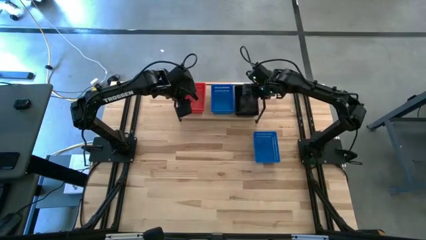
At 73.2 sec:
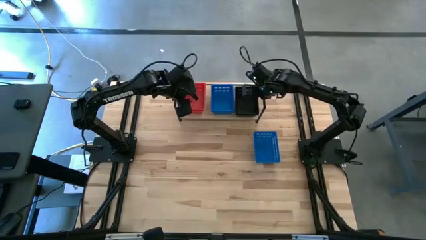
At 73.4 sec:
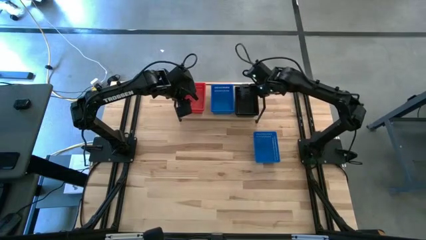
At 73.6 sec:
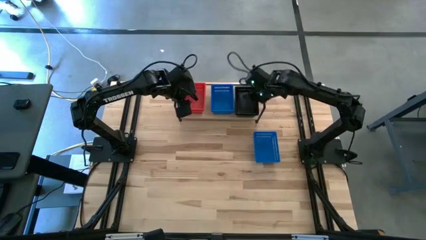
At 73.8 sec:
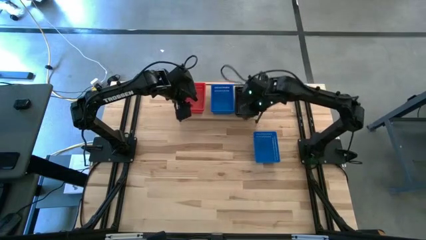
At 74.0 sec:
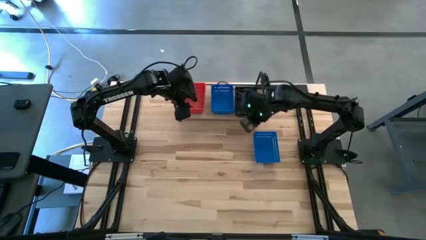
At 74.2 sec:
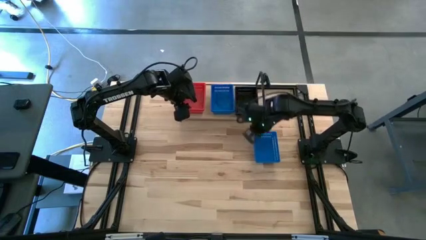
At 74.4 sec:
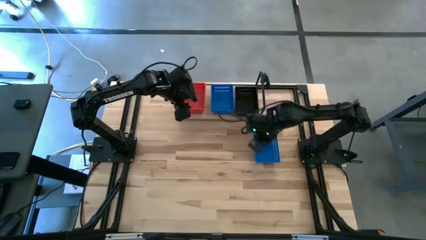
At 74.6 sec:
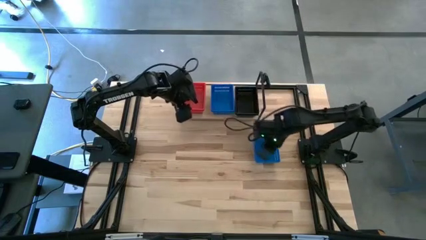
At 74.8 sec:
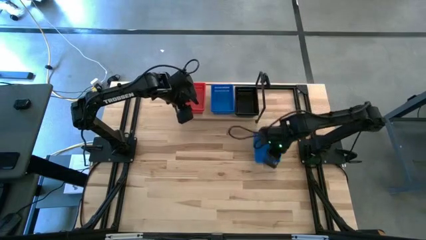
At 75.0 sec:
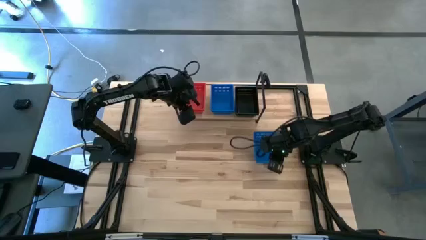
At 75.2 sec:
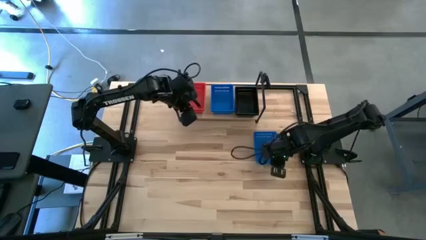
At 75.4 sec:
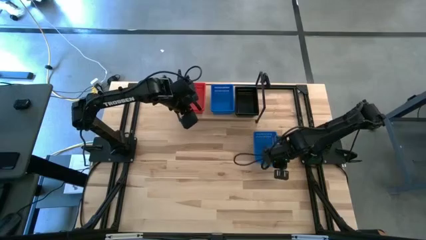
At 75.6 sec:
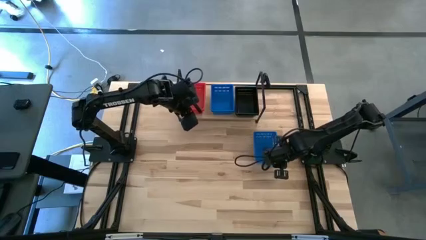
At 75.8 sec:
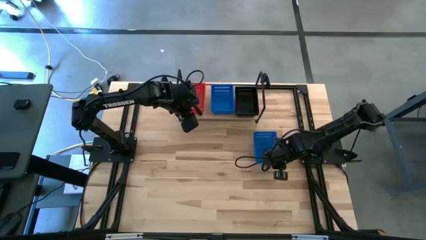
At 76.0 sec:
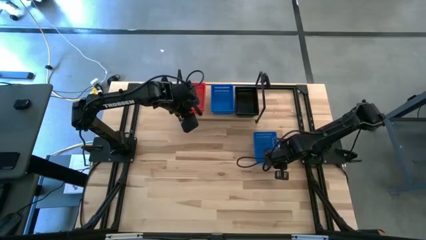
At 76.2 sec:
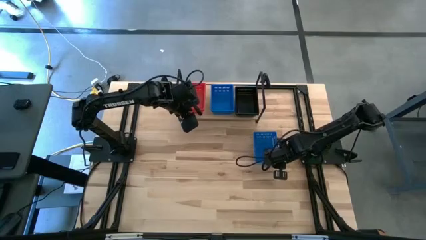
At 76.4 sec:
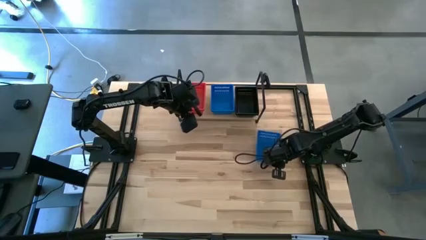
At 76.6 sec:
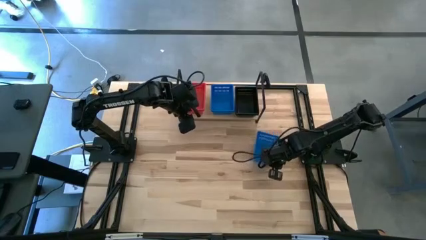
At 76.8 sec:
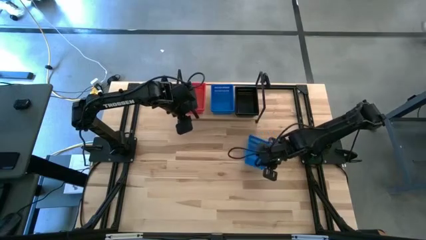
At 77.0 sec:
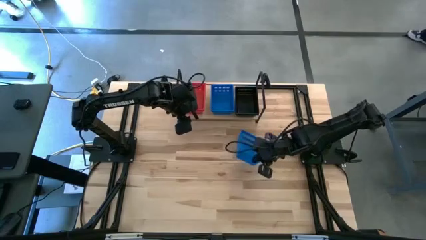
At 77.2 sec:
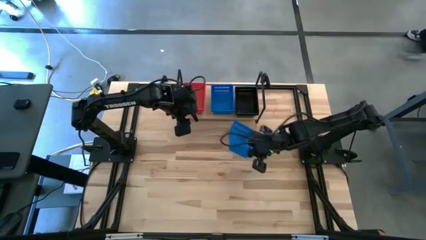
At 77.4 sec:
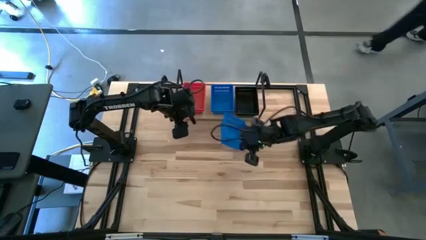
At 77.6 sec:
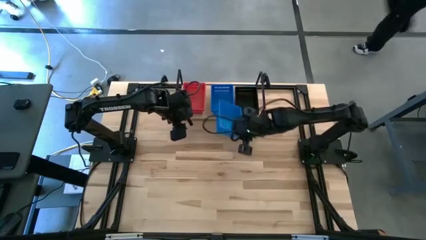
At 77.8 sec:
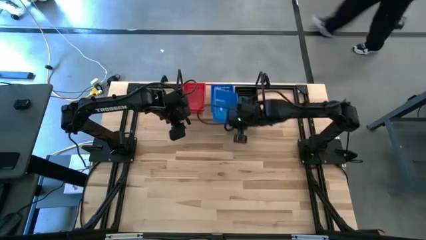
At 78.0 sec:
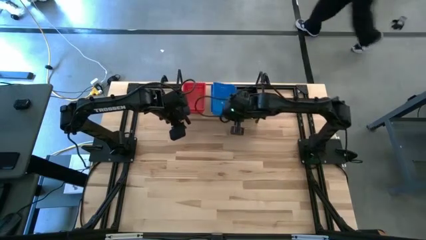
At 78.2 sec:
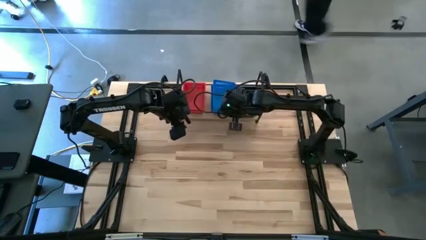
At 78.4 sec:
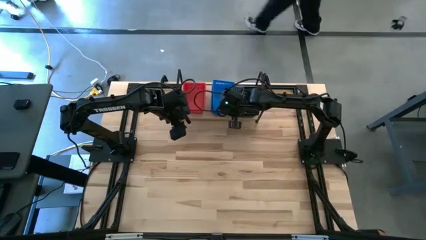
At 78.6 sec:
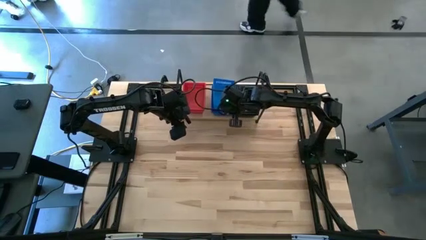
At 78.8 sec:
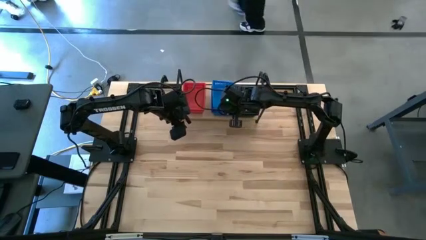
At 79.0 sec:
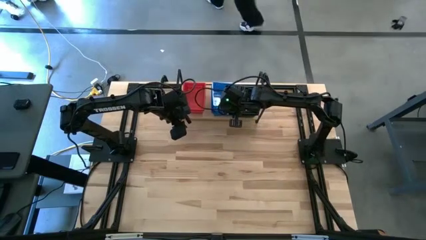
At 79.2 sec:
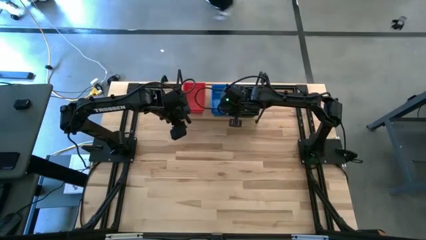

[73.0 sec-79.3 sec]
Task: Stack baskets on shelf by color
Stack the blue bin on top of the blue bins on the shelf

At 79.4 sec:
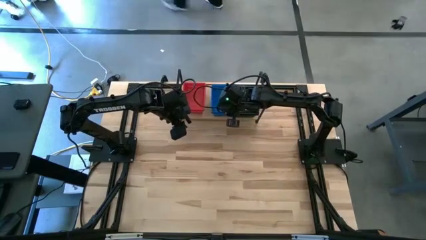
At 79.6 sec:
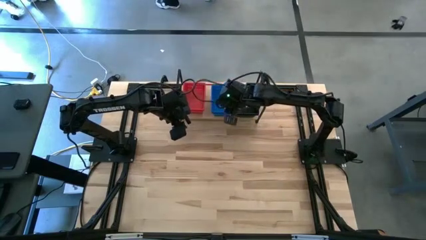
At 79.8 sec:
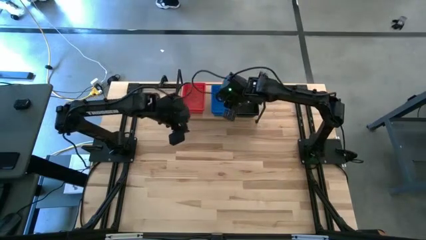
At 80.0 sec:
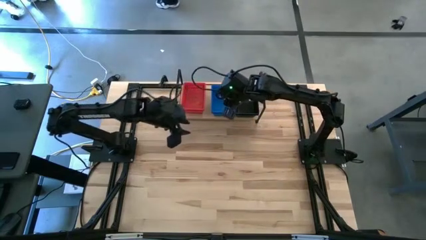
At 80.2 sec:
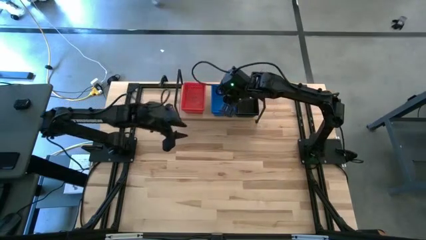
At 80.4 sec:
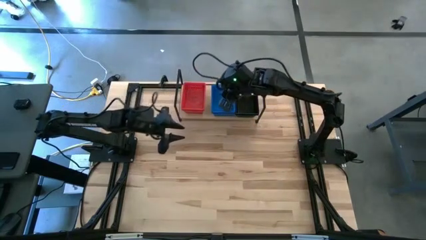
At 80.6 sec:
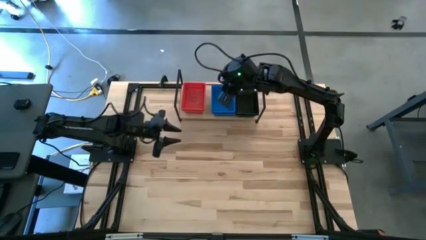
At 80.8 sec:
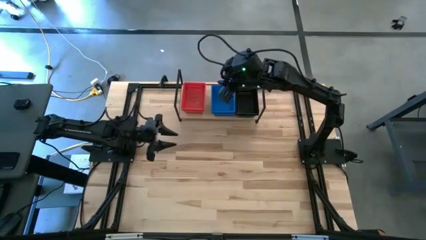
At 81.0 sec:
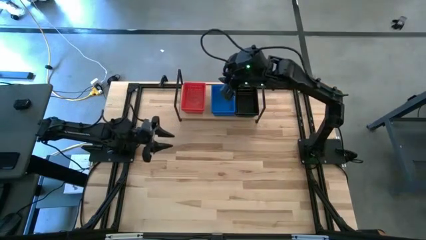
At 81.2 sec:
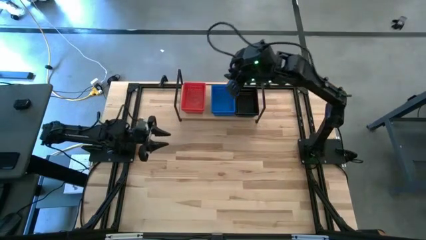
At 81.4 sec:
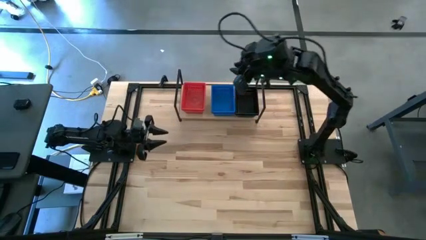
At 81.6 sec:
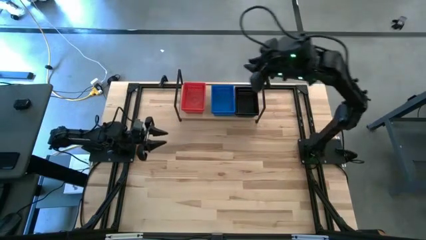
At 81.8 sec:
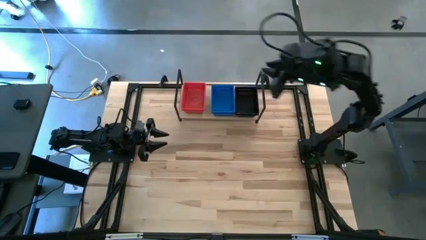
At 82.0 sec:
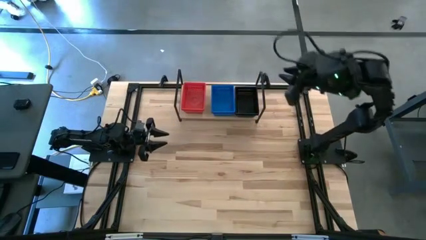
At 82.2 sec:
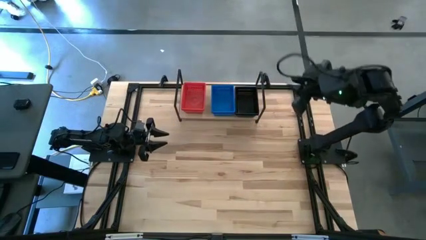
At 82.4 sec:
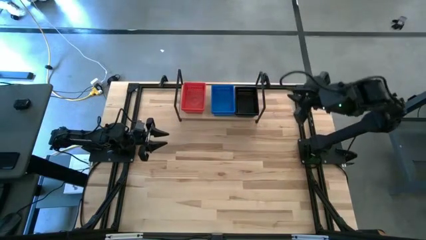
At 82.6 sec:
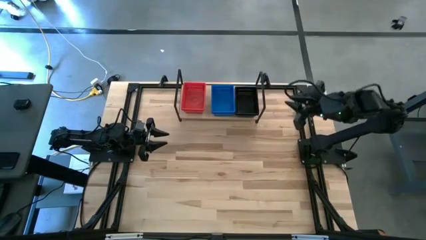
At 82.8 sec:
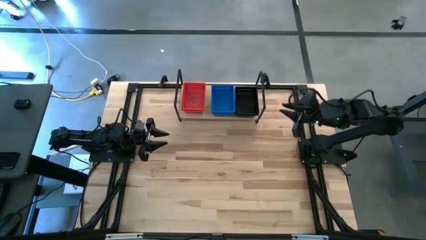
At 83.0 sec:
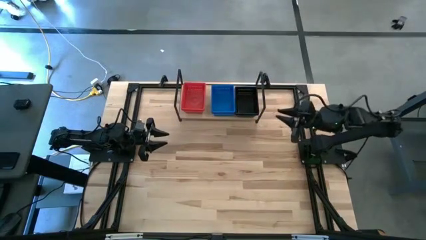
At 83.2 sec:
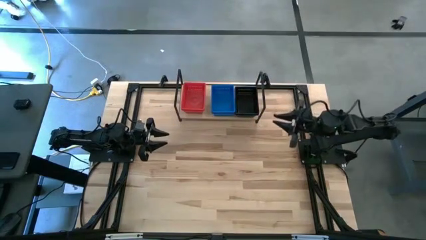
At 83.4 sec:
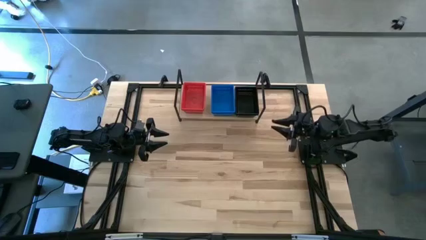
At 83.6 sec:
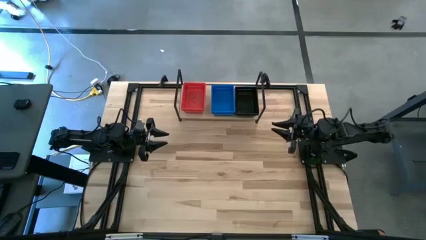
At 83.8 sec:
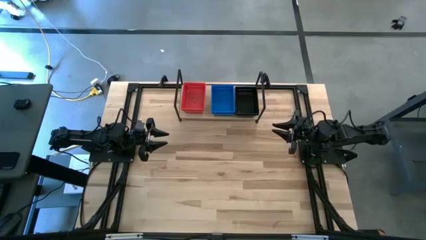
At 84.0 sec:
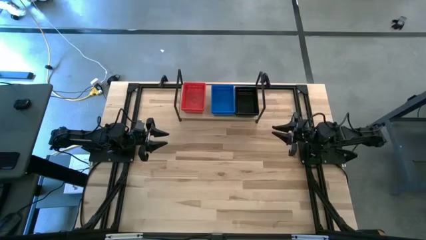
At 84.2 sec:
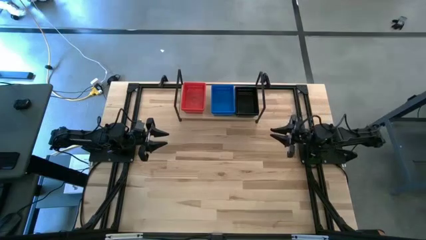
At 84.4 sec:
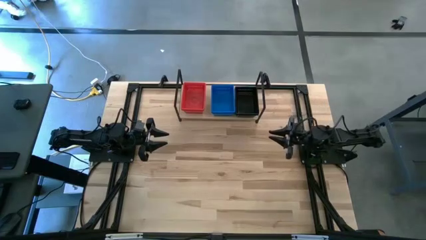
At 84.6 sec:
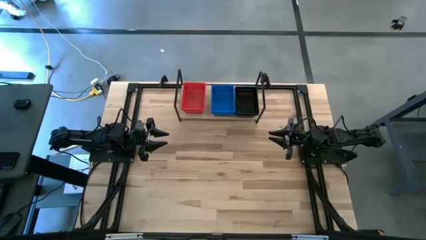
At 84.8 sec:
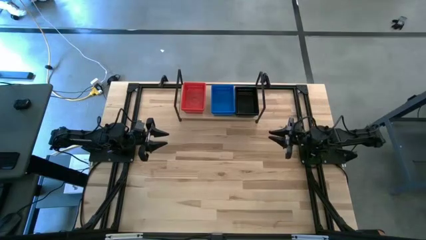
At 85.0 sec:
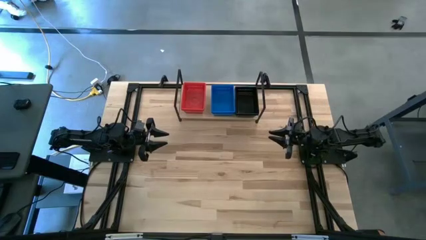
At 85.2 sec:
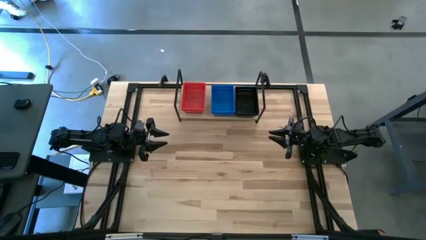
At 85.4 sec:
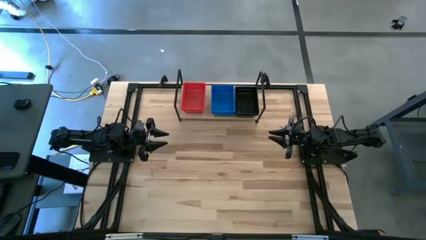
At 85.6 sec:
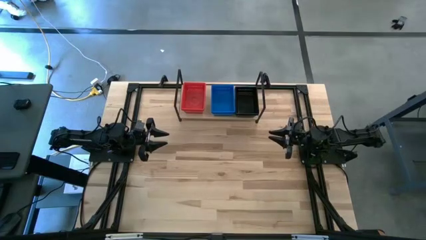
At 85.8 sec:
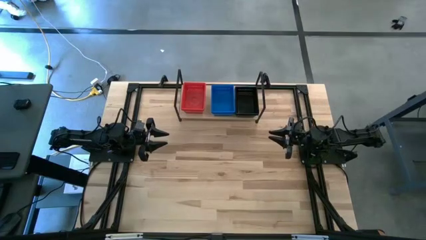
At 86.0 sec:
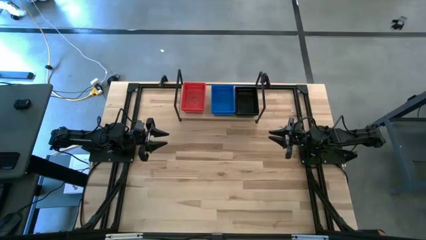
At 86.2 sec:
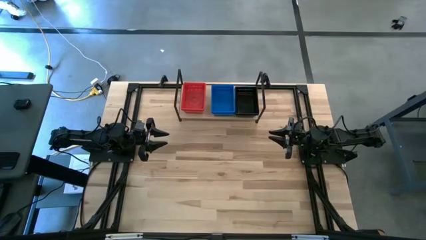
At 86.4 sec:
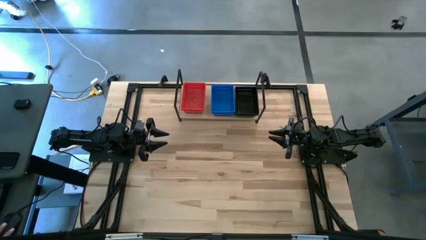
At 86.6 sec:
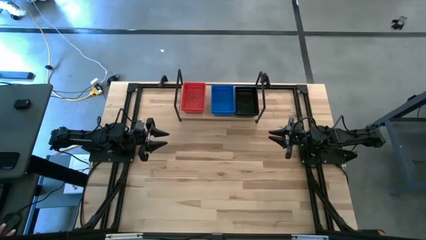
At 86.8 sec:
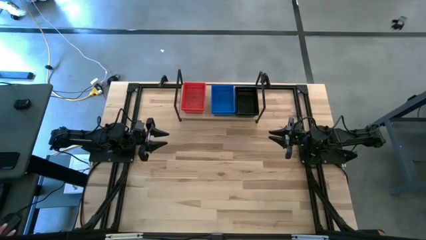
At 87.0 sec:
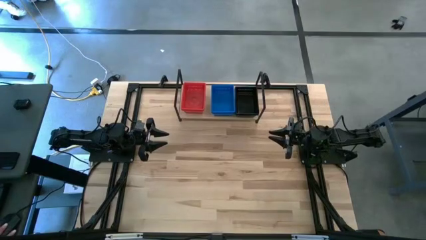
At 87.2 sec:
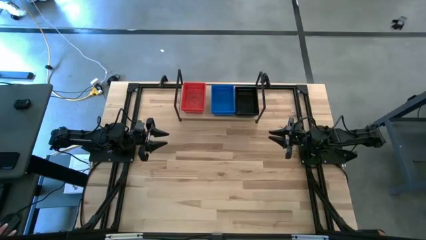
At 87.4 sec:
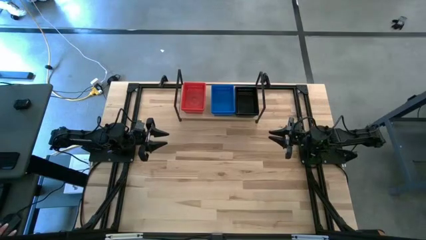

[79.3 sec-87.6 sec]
Return to Home Position
